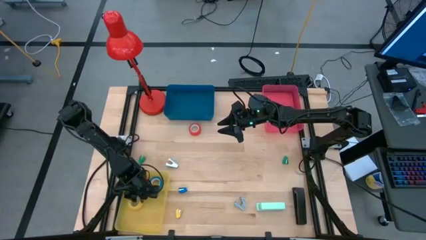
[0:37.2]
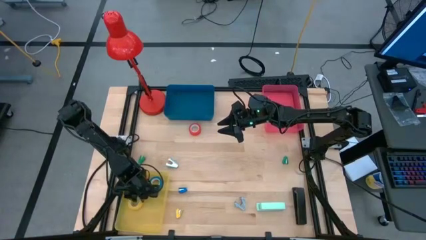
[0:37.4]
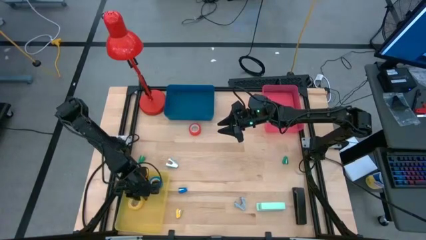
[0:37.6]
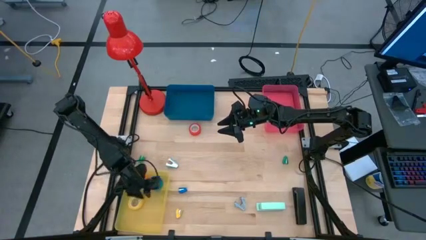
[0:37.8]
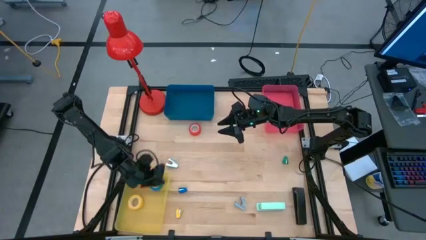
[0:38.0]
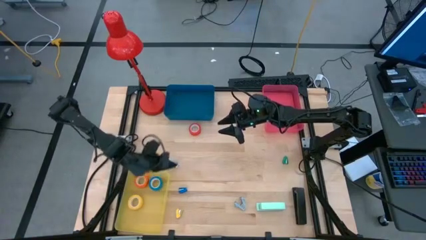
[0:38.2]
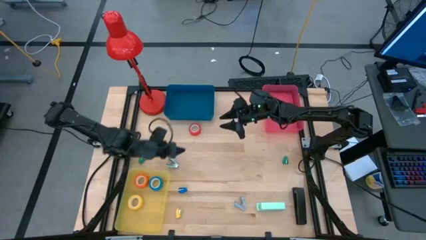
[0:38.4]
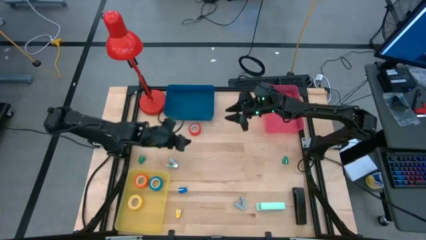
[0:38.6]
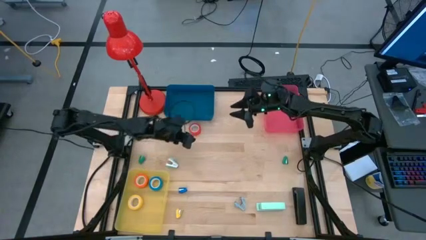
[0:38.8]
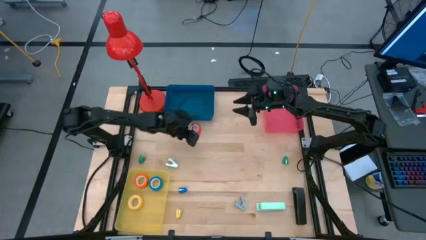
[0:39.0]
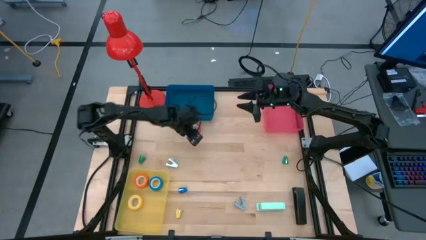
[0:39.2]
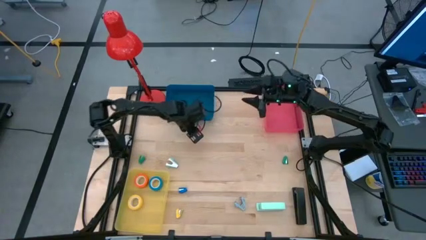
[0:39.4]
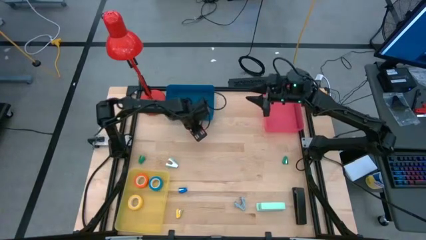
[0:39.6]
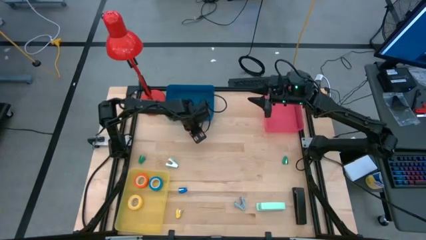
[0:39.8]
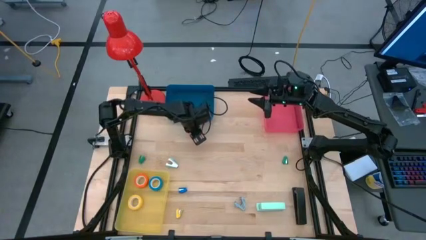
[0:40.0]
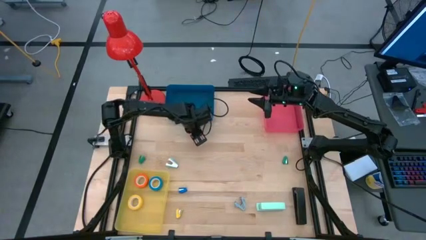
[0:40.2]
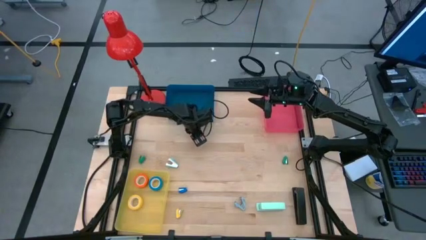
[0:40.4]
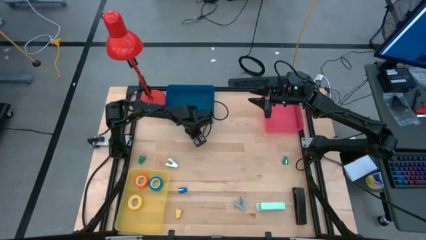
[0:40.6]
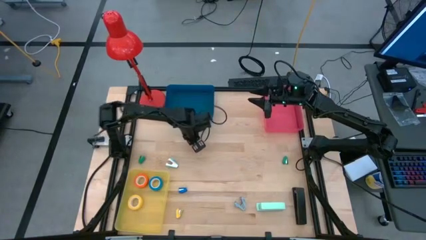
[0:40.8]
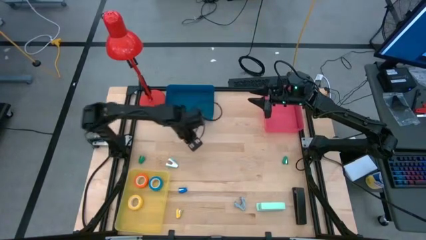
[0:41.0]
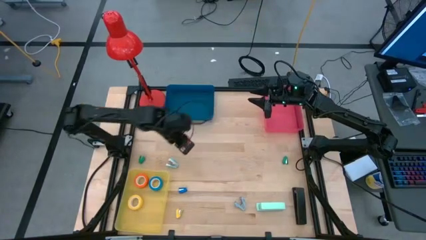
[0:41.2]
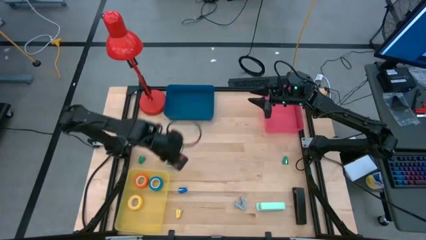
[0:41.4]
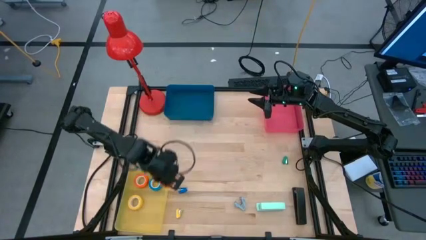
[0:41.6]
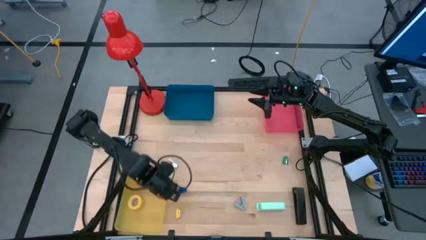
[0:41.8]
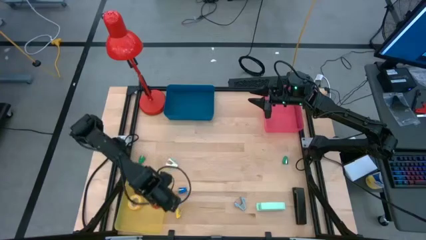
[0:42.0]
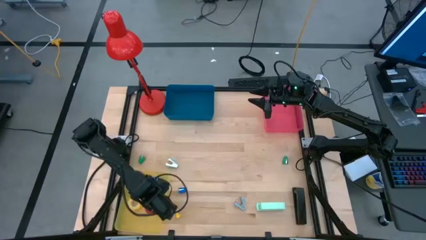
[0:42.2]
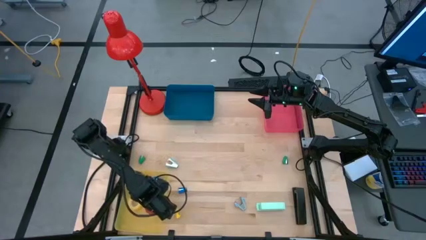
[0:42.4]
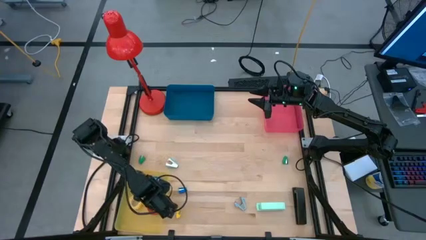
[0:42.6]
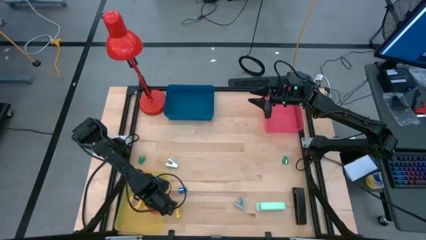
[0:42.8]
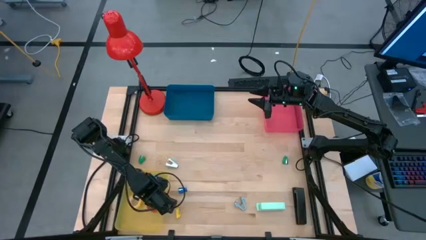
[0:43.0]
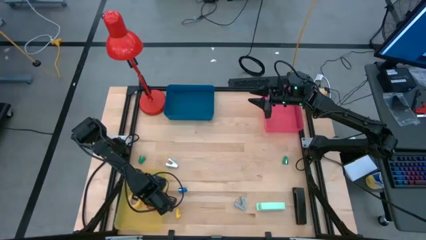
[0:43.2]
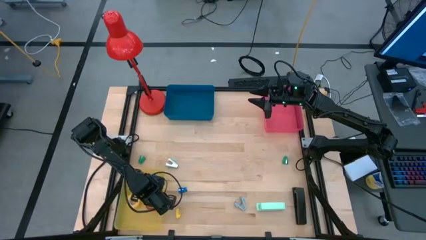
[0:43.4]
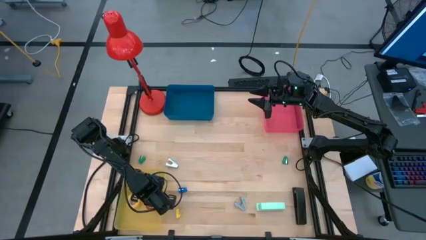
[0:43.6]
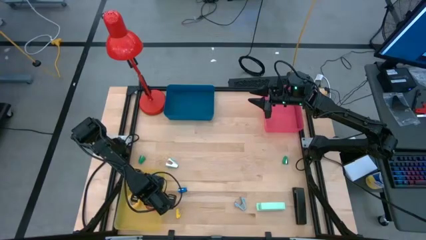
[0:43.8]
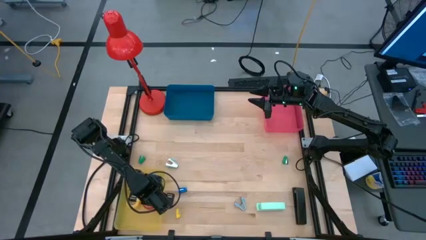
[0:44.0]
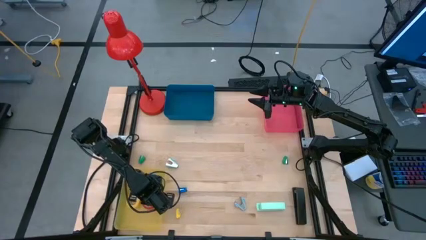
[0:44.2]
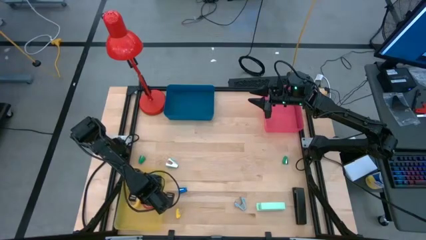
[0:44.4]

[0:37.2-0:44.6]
Task: Pick and place Stapler, Stapler remover, tape
Put the orange tape into the yellow bin

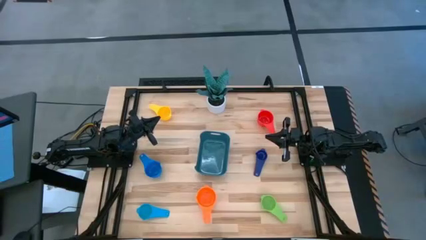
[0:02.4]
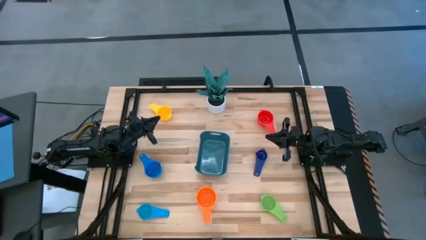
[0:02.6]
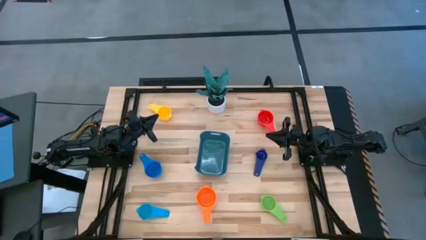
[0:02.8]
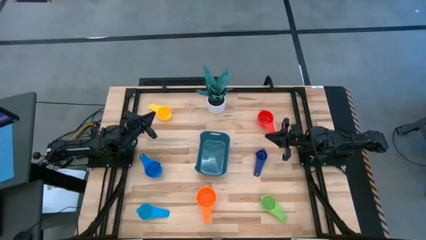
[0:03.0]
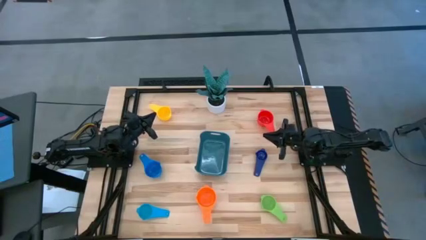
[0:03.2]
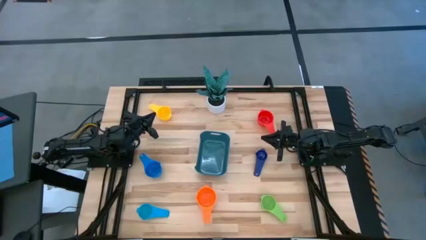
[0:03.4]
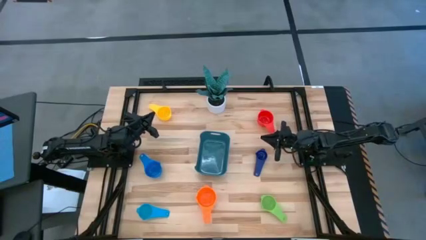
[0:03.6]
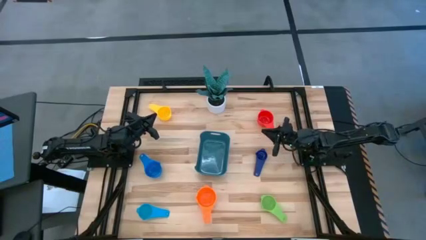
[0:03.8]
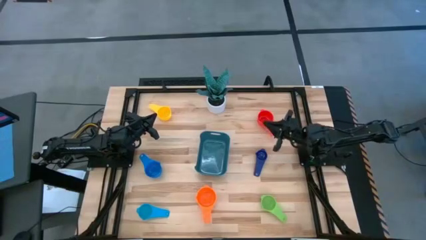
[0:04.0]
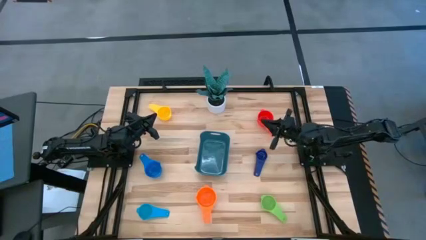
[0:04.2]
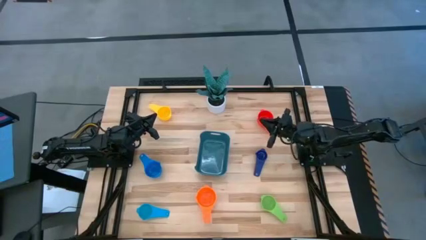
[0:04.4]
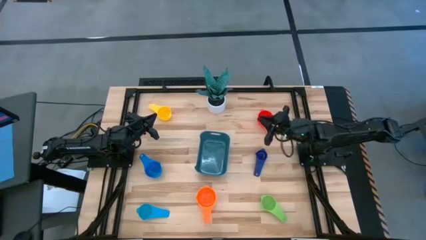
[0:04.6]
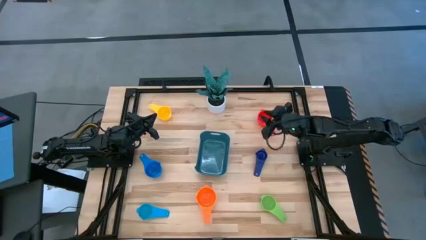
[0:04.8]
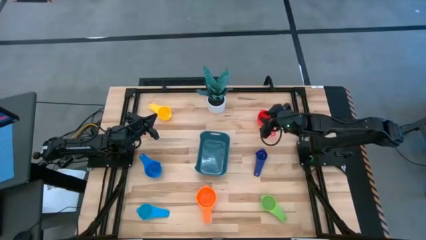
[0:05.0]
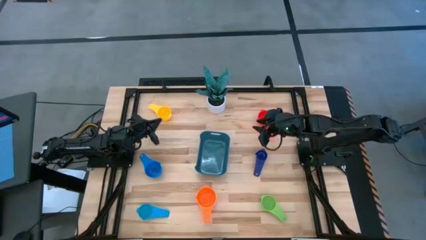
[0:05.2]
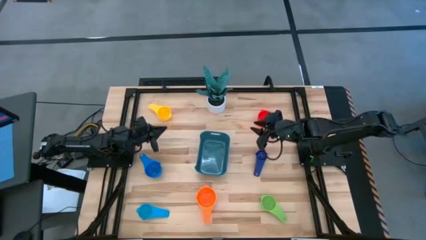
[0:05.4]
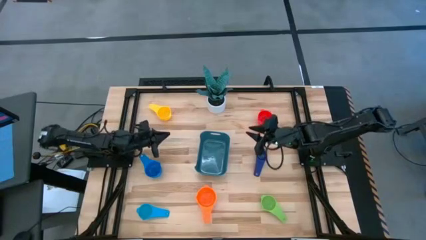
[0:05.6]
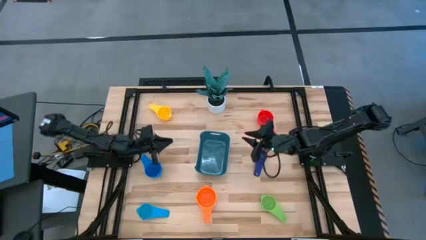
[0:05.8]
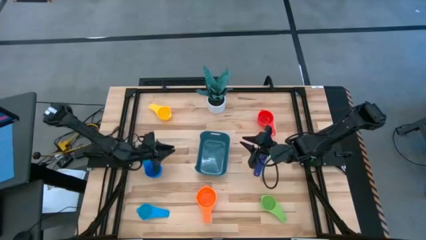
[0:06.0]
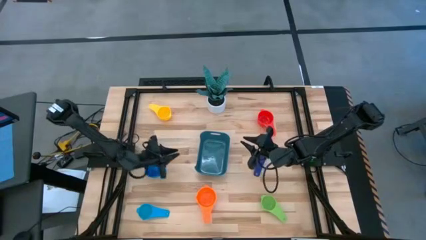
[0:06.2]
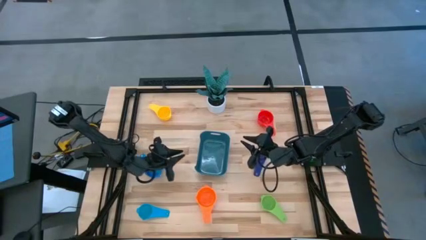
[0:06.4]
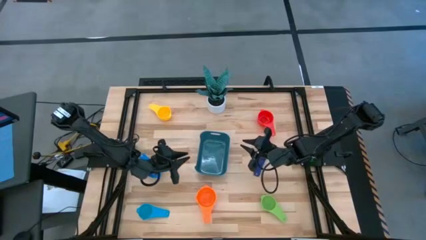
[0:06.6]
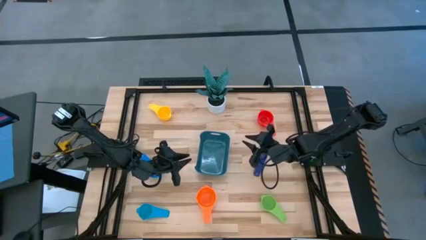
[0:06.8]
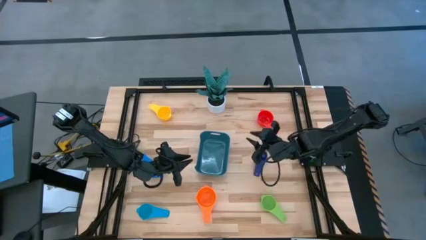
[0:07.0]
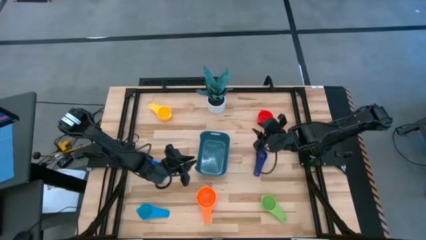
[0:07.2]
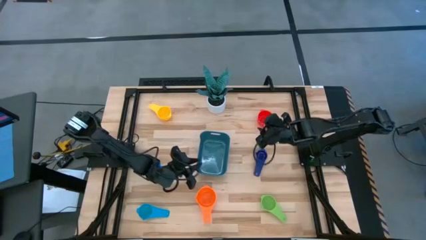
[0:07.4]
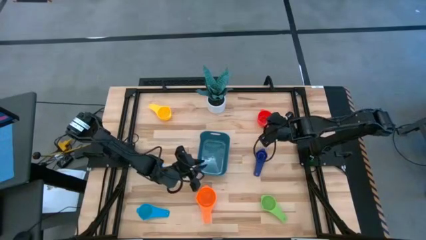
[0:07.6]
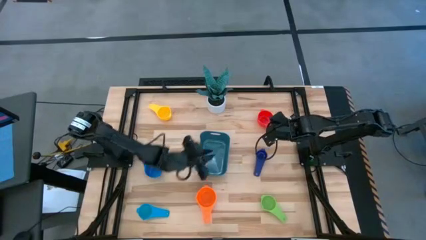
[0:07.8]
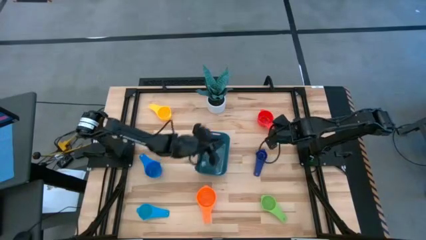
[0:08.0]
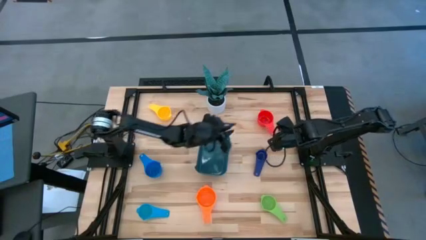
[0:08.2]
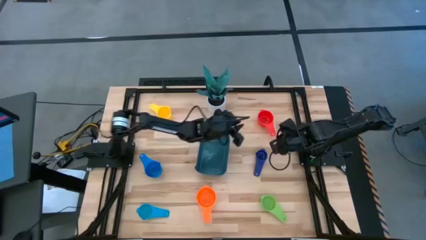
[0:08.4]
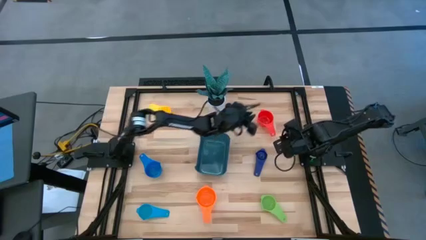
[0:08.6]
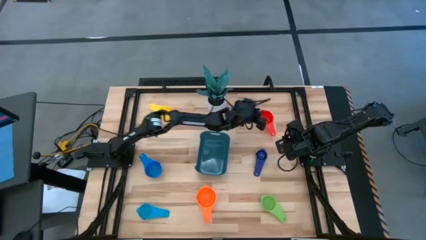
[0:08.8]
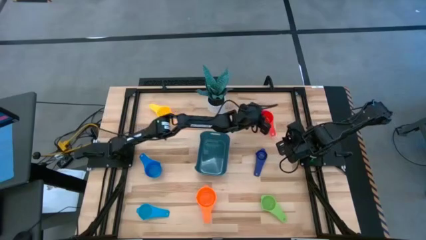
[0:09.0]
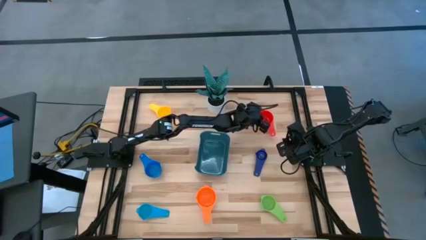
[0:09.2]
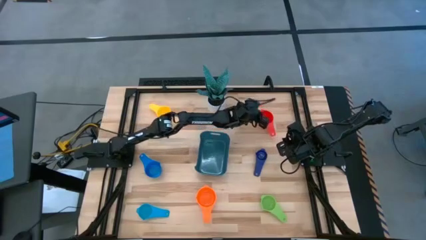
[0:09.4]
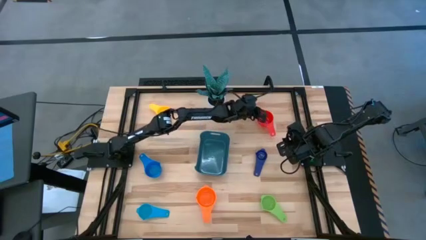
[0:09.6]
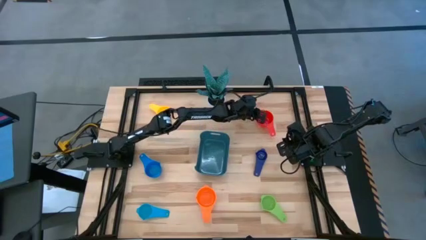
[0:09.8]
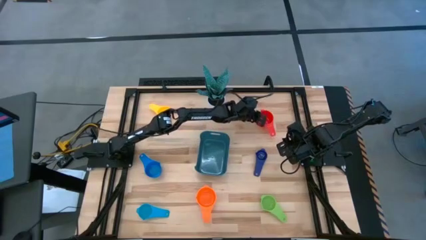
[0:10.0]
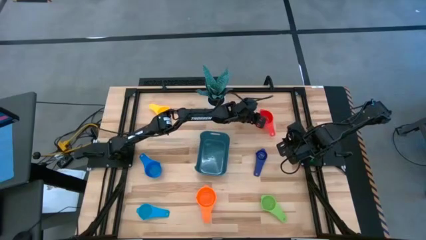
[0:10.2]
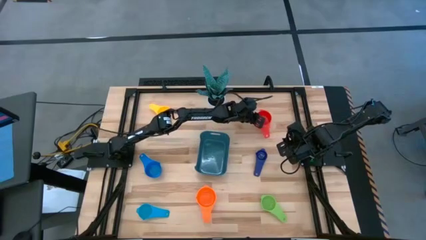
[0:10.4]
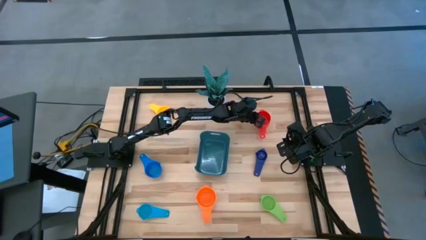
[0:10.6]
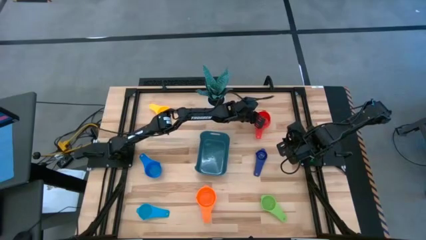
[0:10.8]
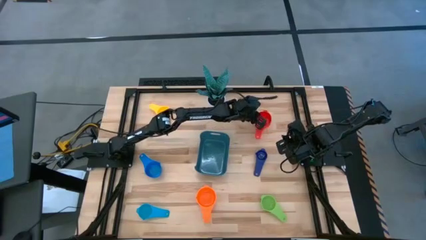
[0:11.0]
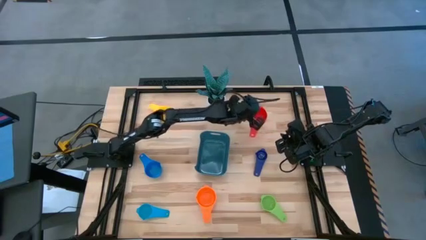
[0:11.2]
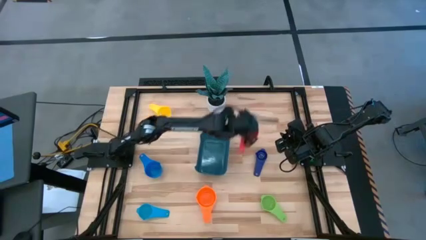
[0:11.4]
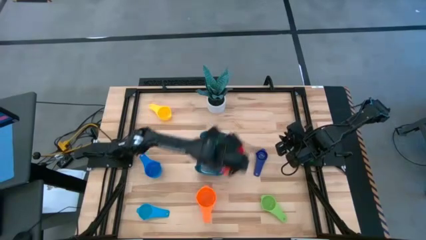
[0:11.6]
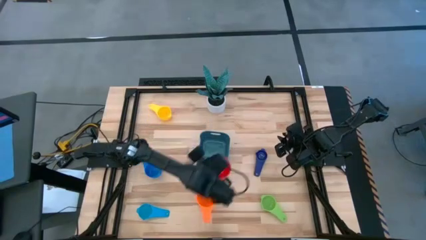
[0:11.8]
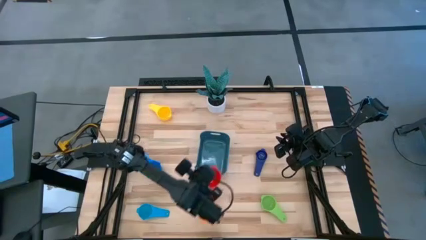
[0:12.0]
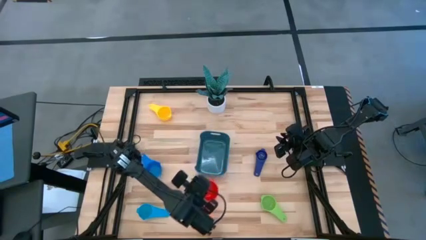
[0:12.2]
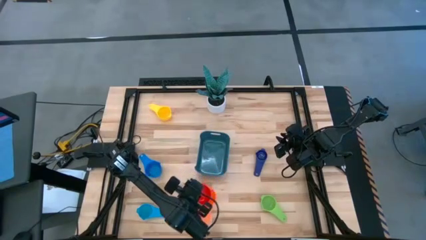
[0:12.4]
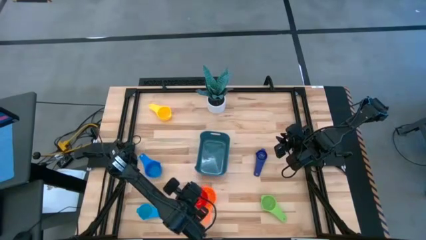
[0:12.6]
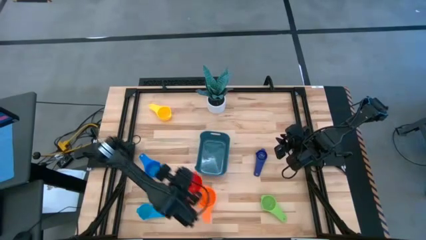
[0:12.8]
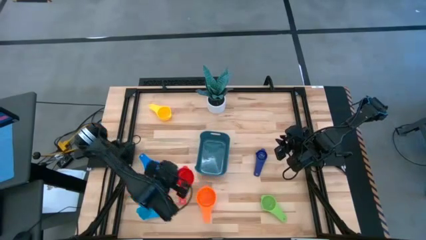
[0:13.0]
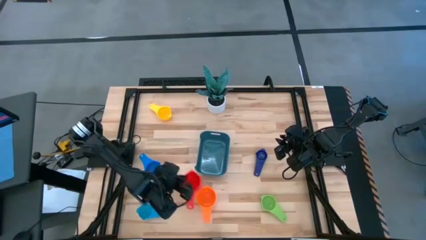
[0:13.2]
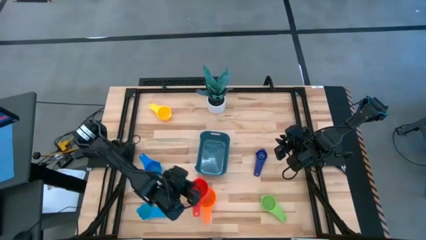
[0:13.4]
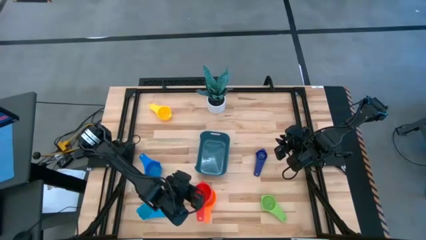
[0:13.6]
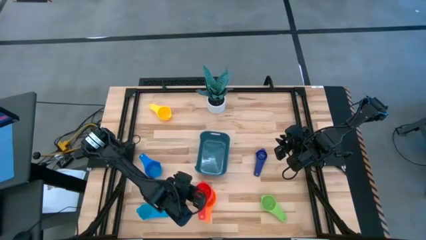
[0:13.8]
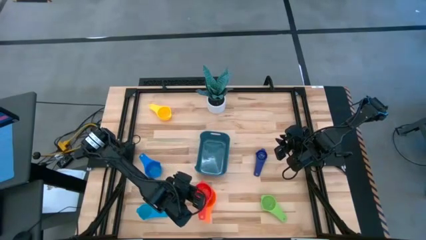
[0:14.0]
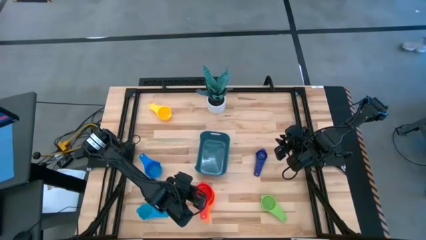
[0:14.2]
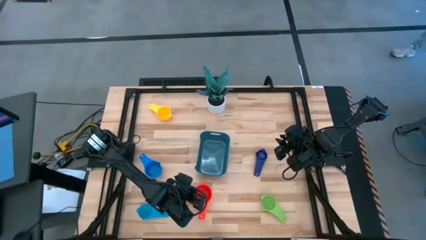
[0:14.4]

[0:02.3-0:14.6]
Task: Nest measuring cups in basket
Stack the red measuring cup on top of the orange measuring cup
